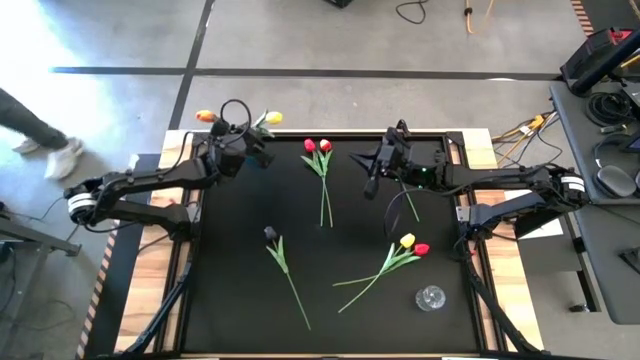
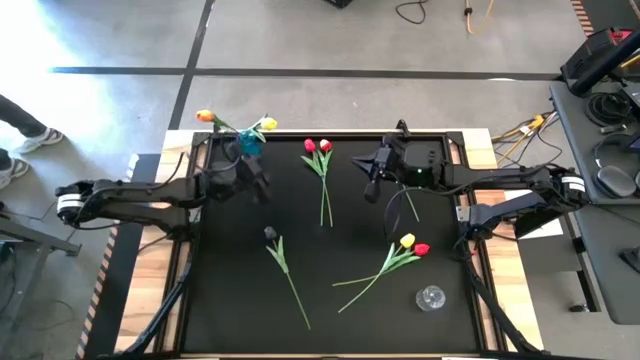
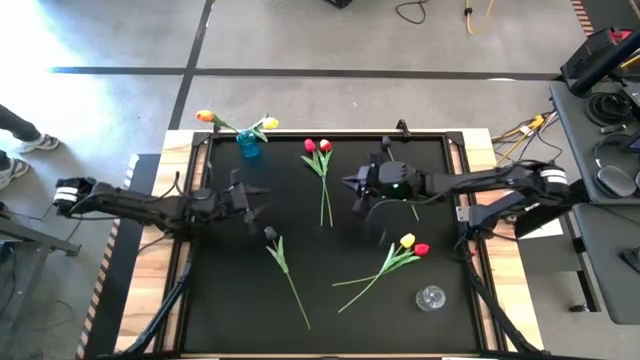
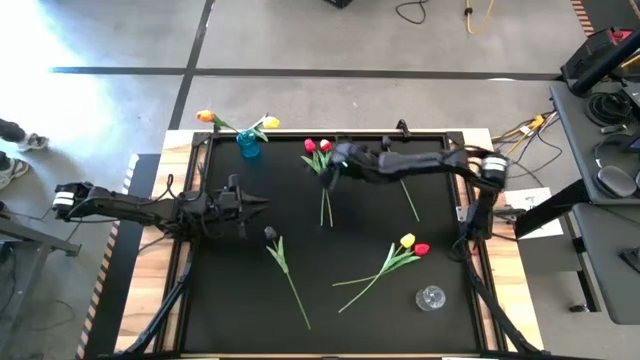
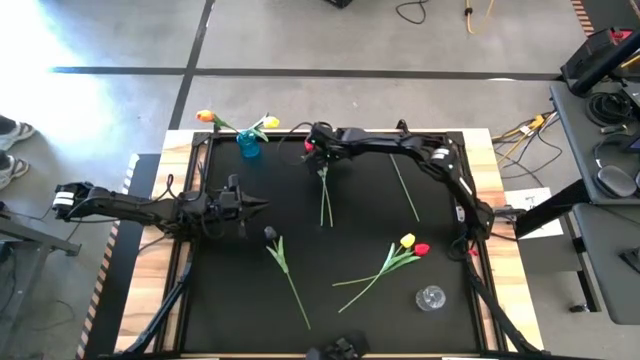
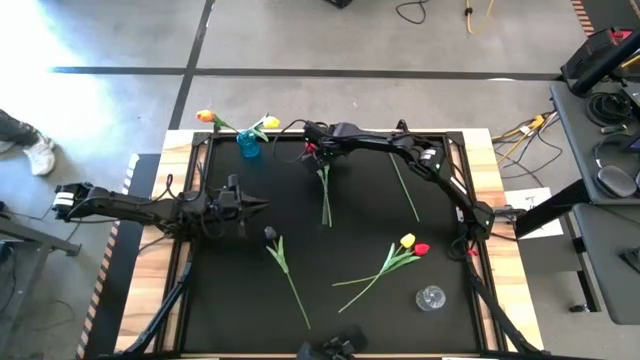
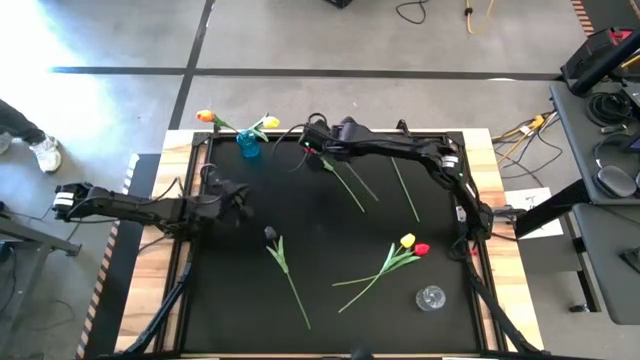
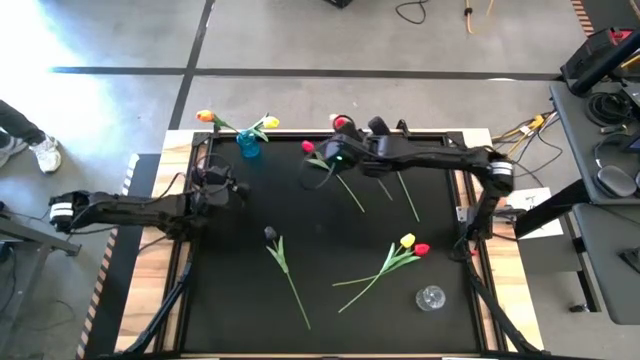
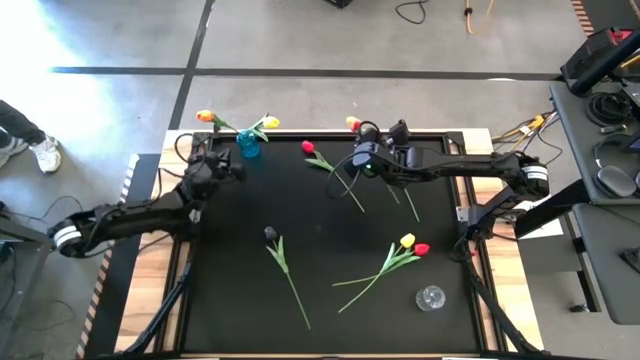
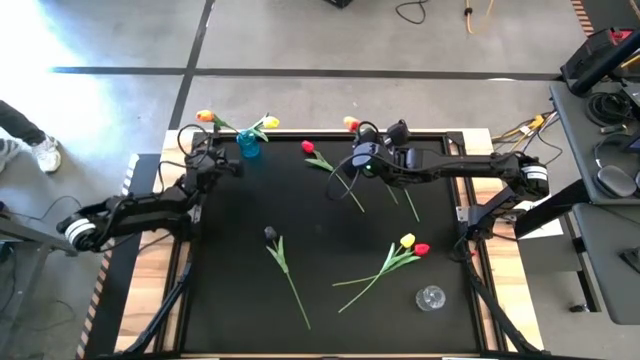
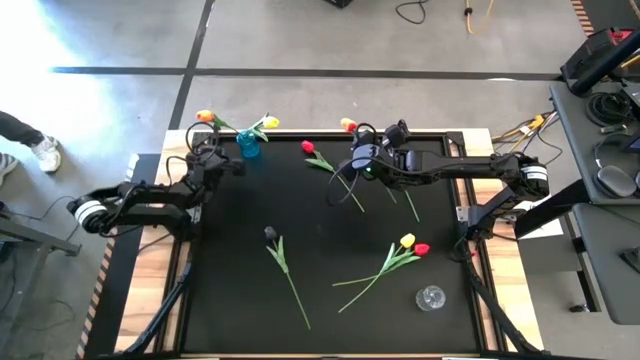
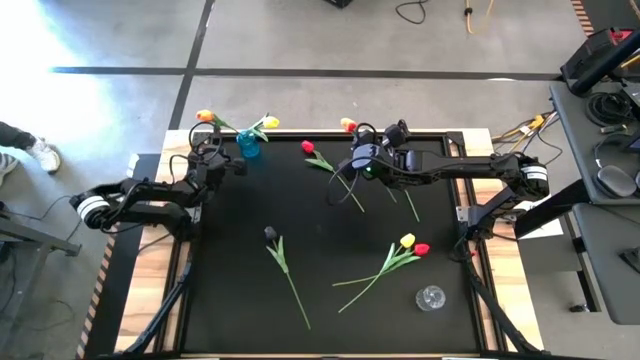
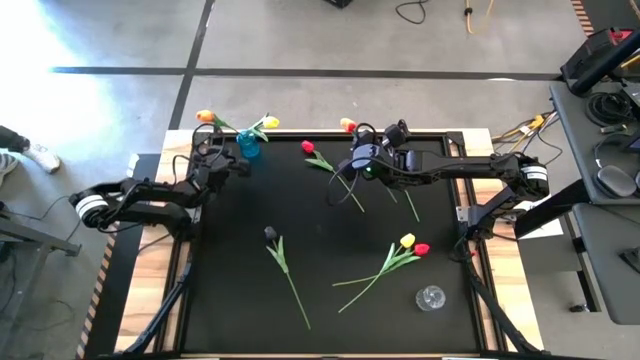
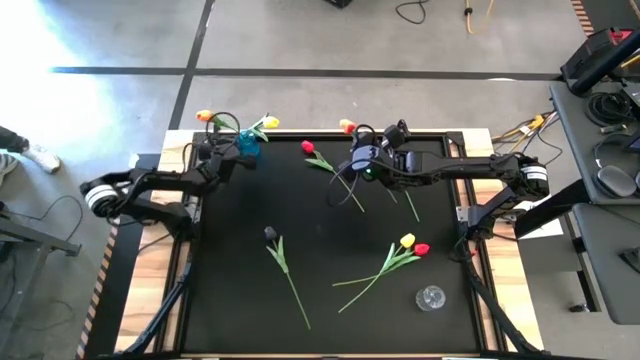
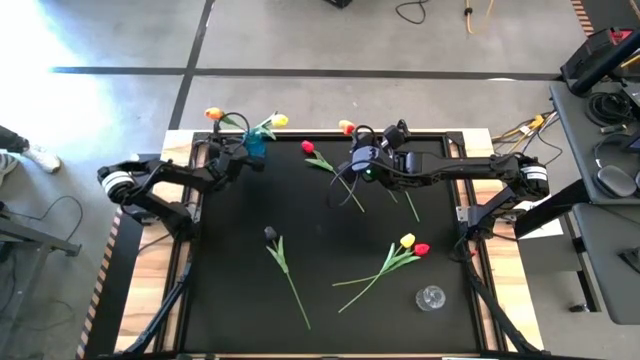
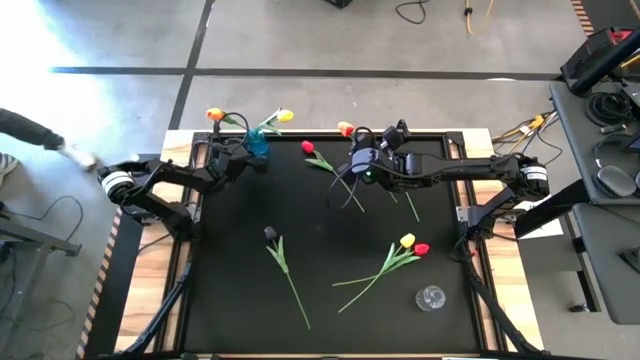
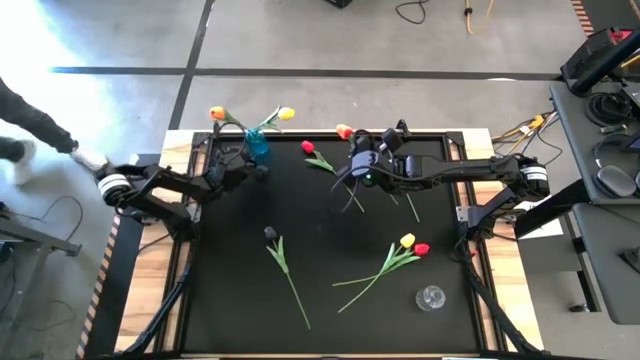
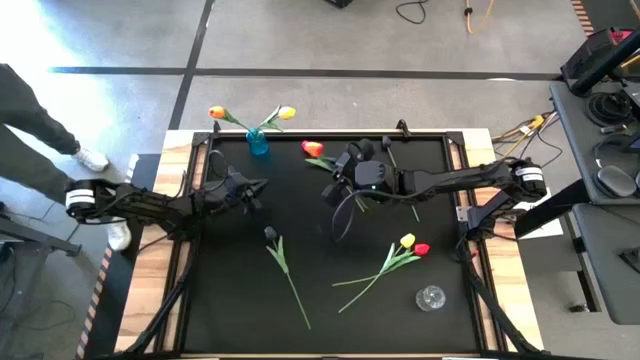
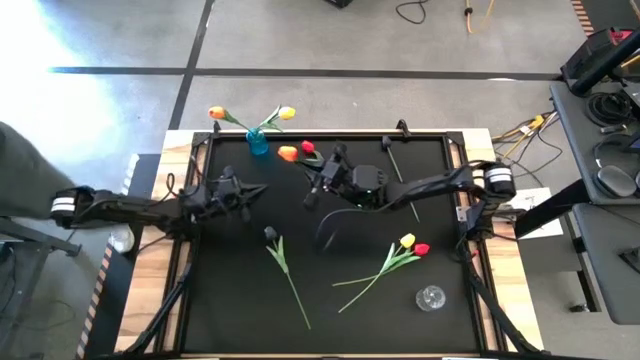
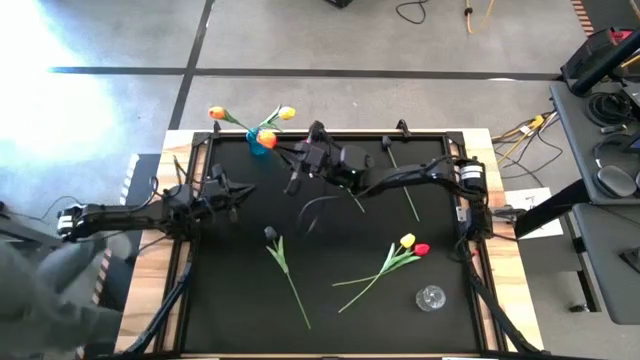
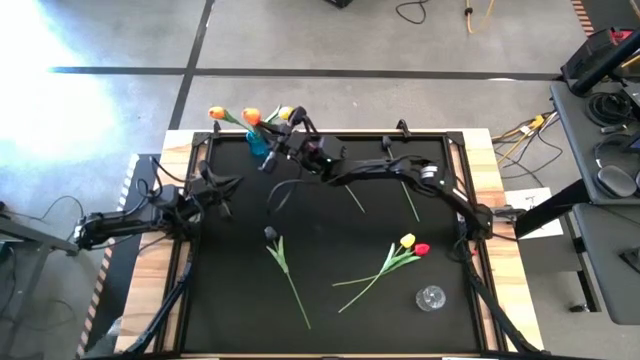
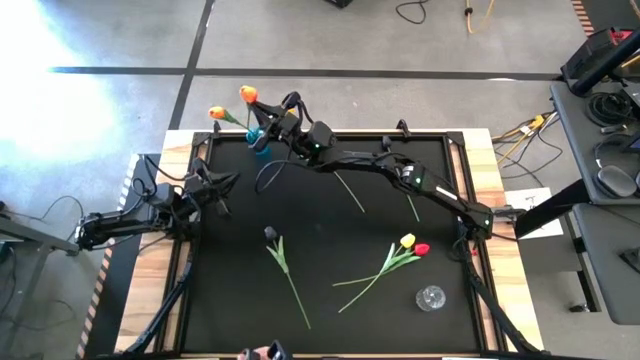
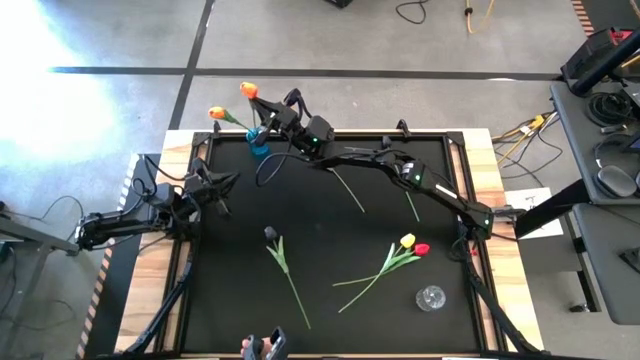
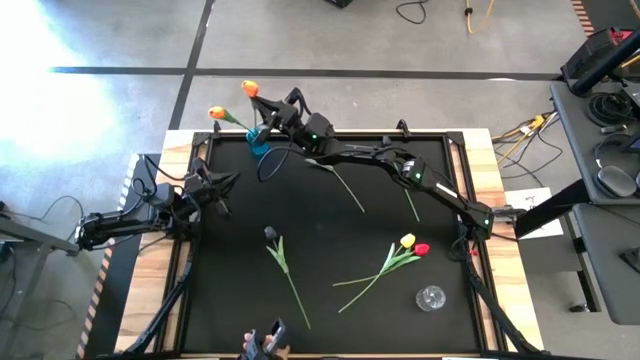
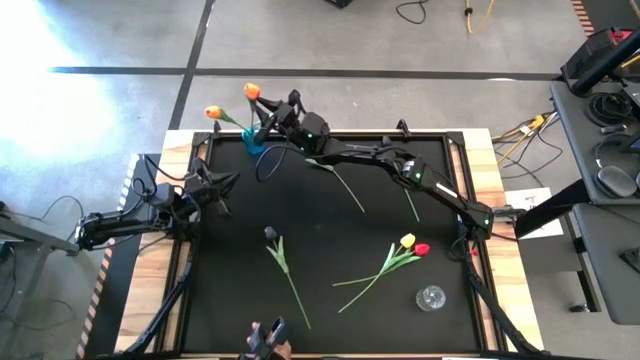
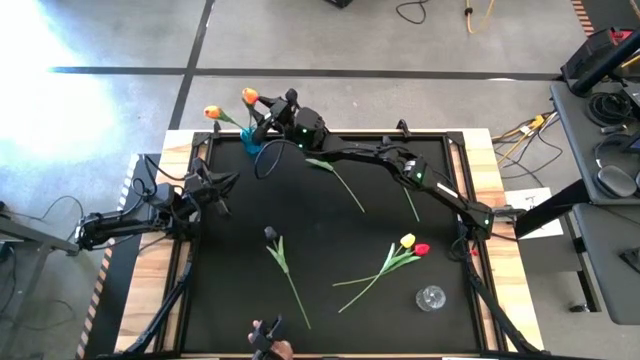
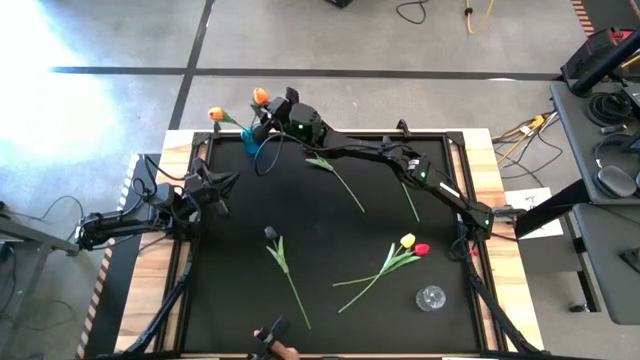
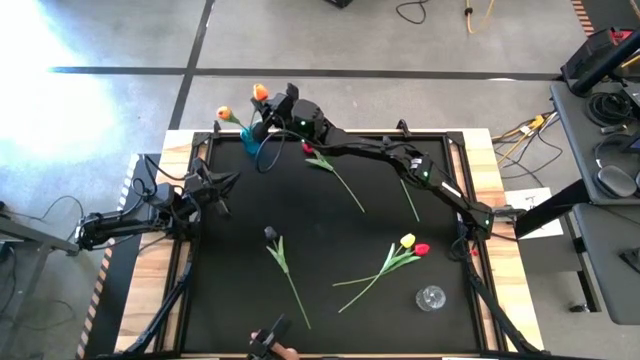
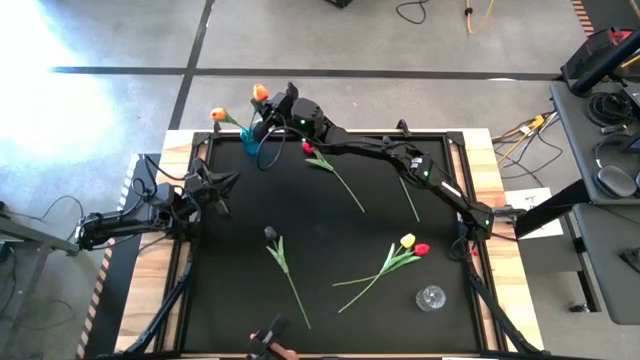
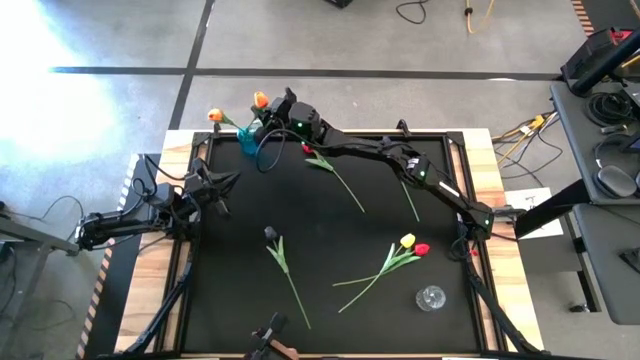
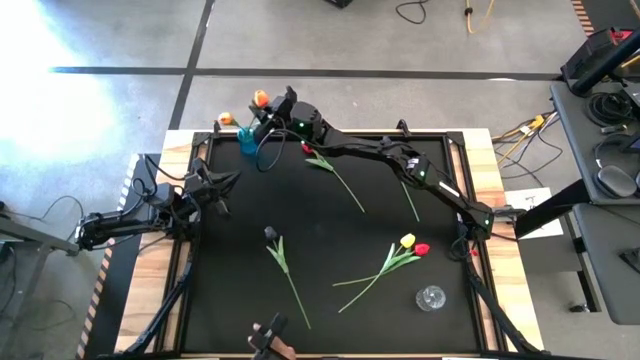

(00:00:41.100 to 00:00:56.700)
Task: Sort flowers into vase by color
Put the orange flower into the blue vase

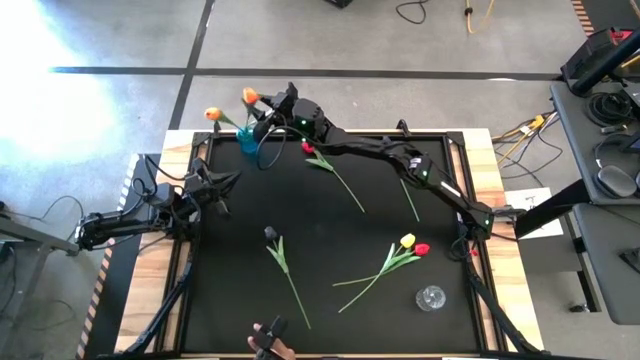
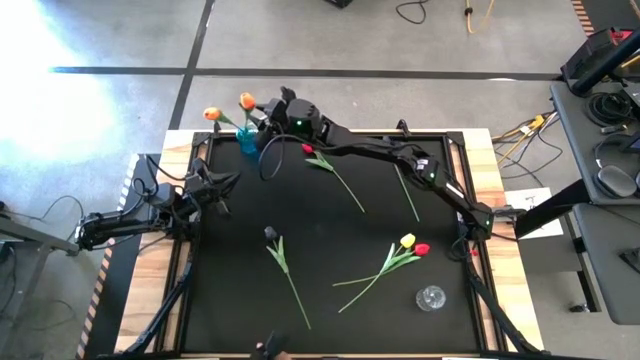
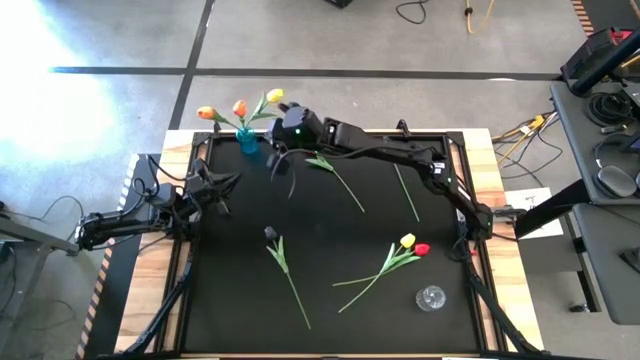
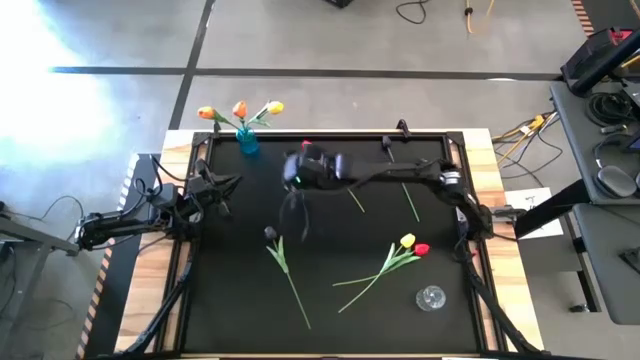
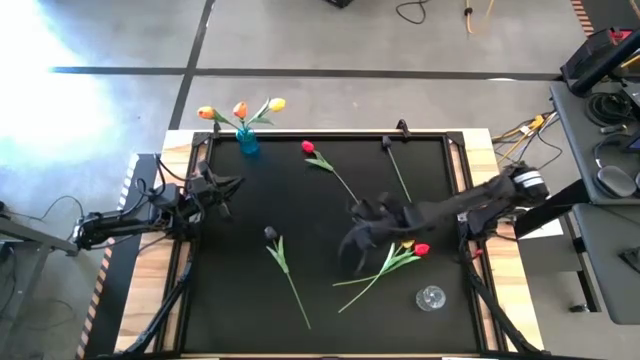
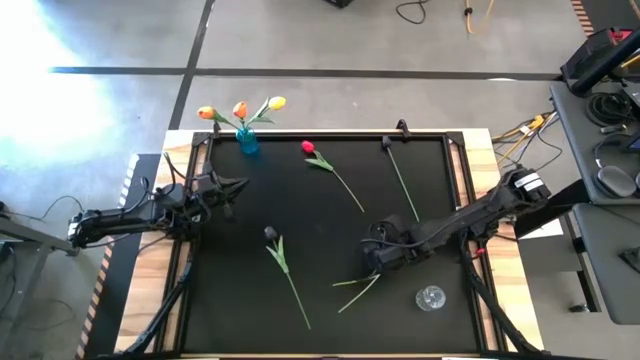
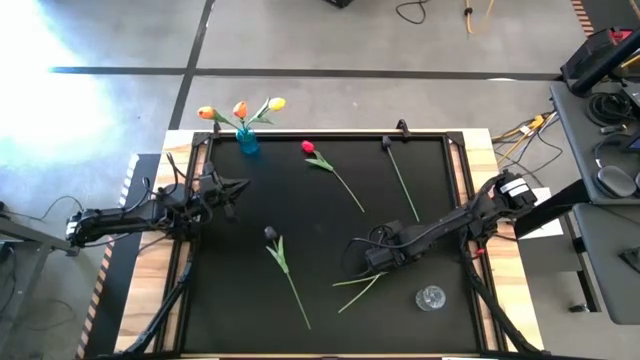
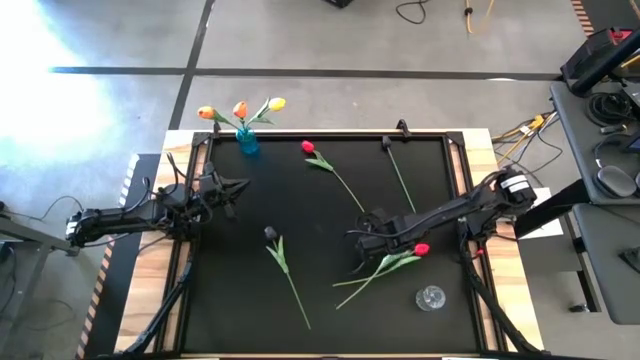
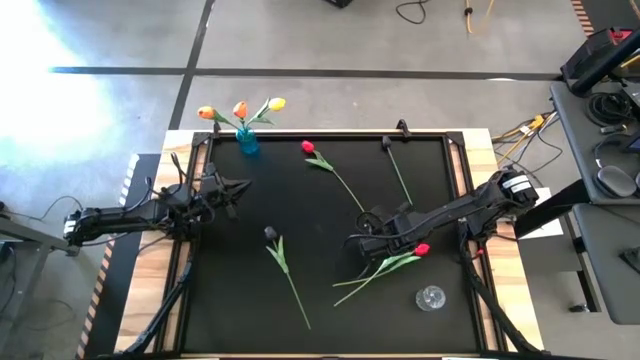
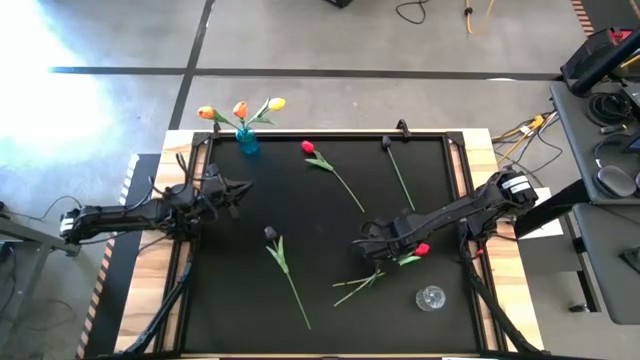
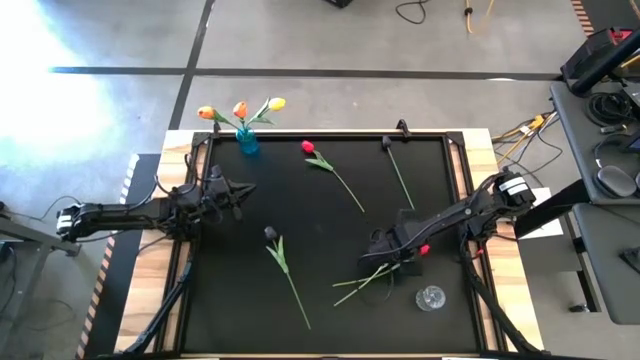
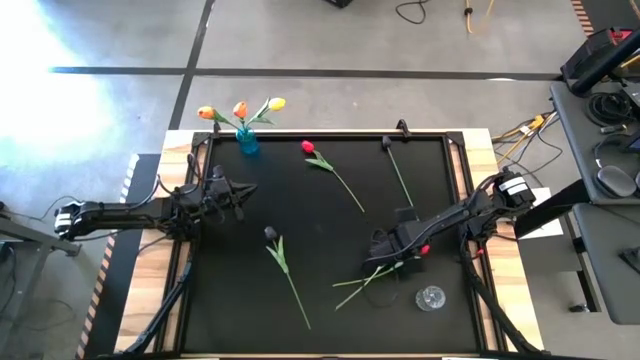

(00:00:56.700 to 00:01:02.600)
Put the yellow flower into the blue vase
